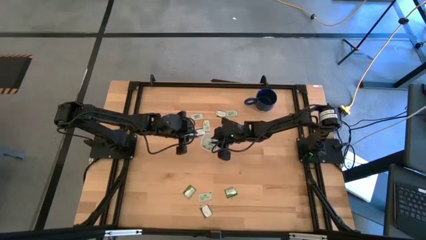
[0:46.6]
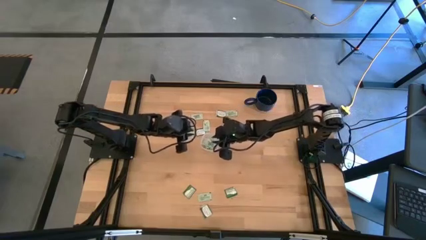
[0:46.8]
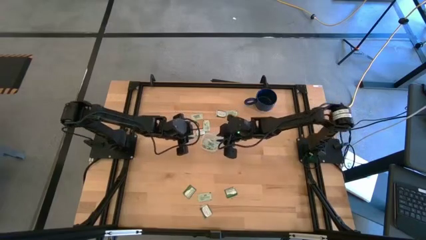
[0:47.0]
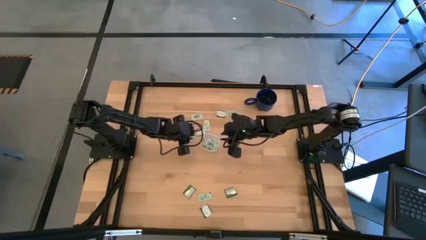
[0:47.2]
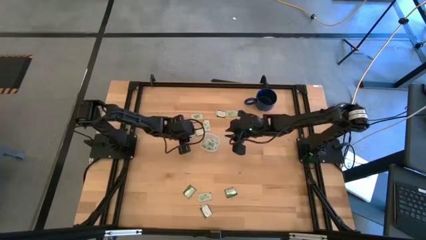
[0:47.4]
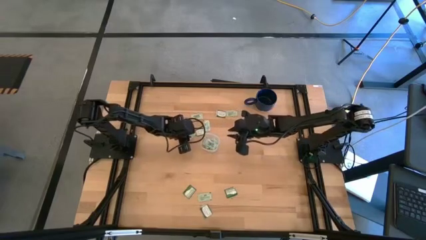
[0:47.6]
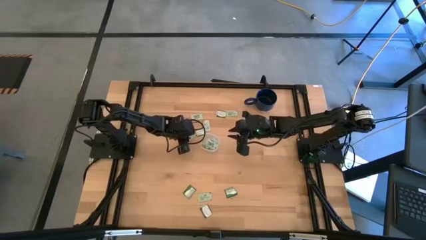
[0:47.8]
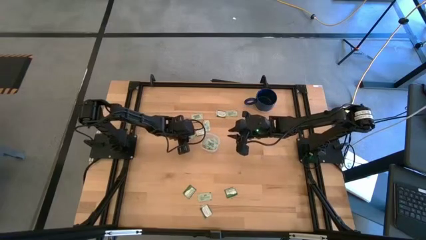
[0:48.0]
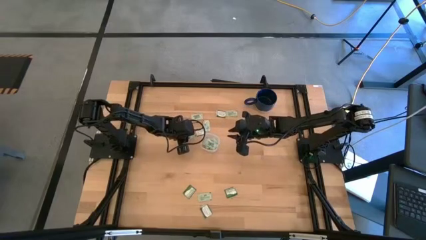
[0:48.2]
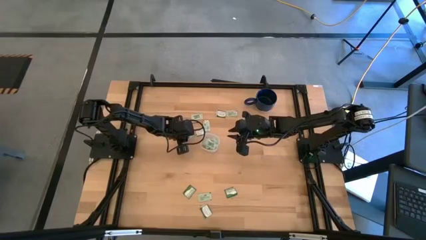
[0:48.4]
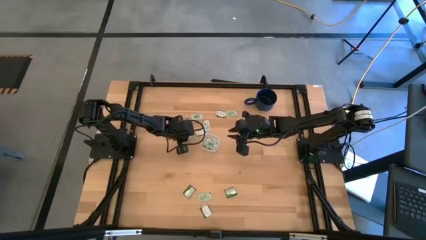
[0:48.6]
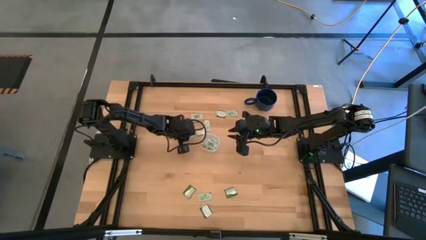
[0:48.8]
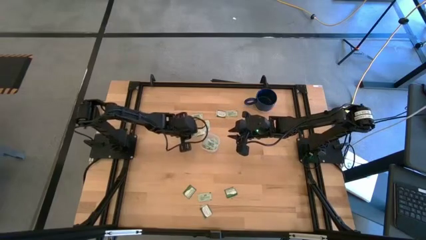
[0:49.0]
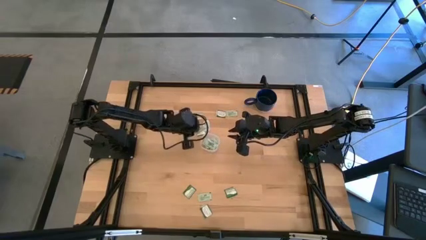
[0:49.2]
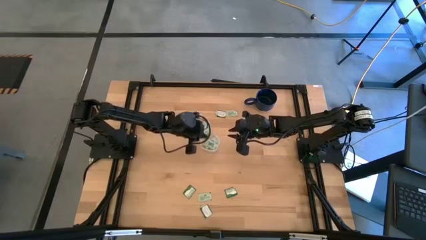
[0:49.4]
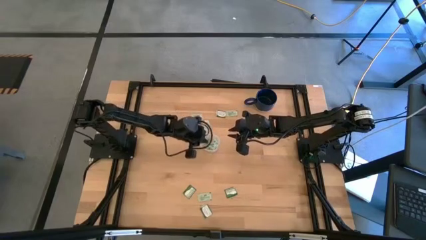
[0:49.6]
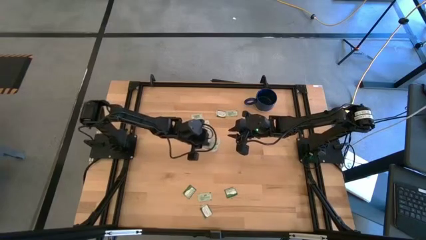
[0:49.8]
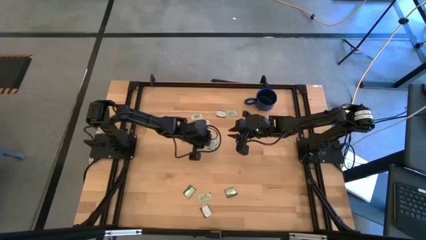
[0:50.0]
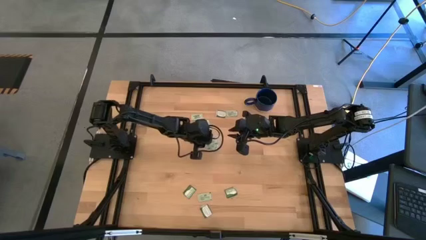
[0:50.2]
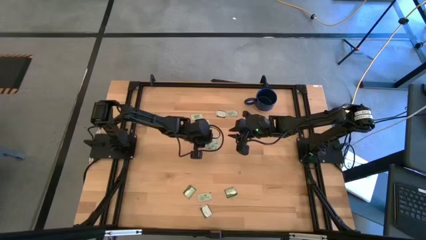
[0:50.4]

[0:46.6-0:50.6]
Task: Pick and place Stevia / Truvia into bins
Put the light green stevia packet into the container

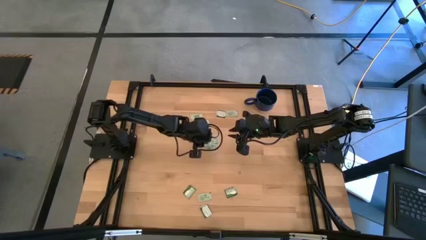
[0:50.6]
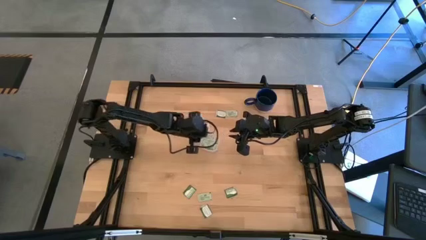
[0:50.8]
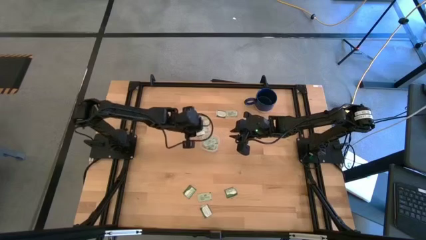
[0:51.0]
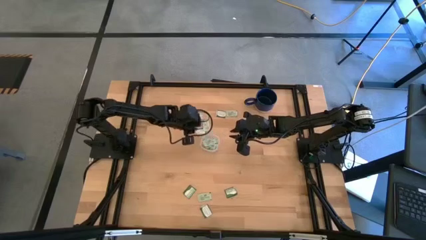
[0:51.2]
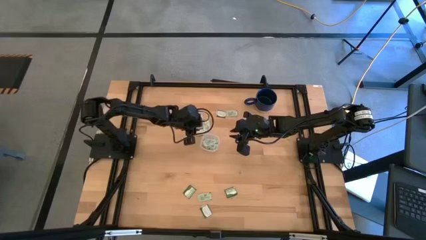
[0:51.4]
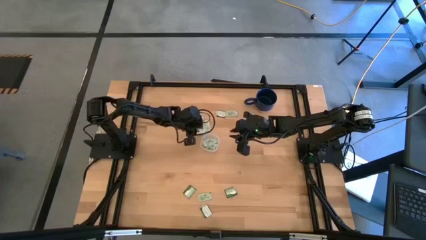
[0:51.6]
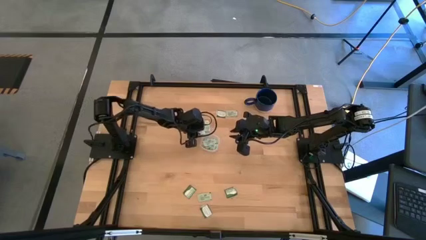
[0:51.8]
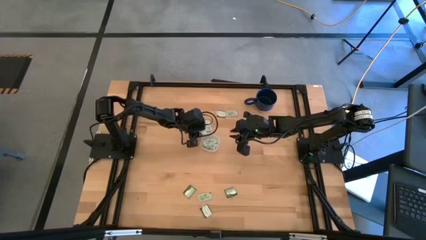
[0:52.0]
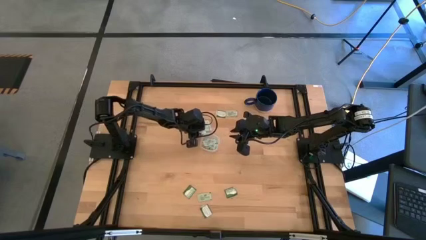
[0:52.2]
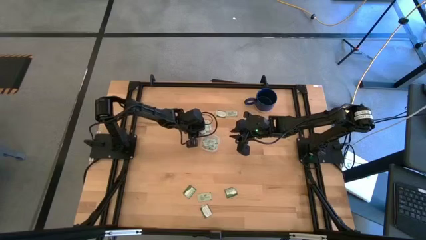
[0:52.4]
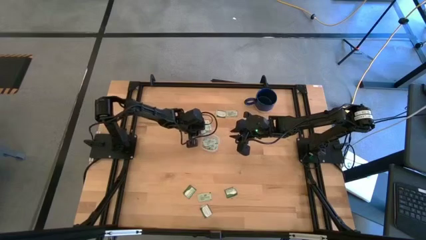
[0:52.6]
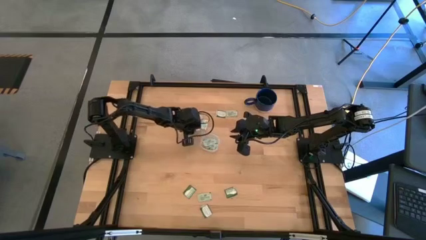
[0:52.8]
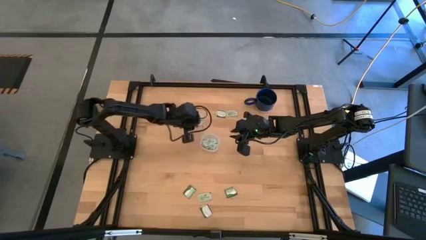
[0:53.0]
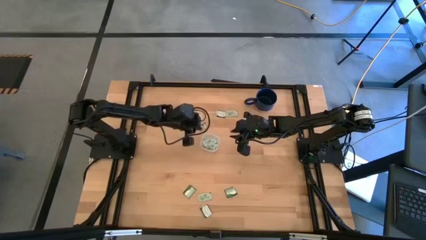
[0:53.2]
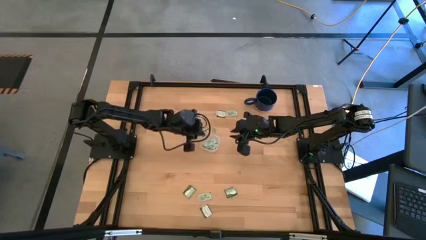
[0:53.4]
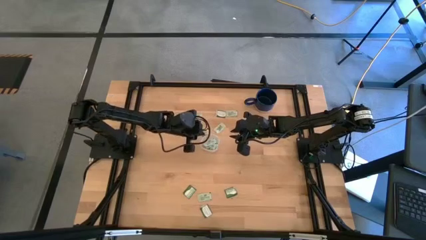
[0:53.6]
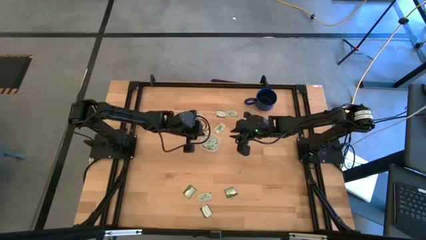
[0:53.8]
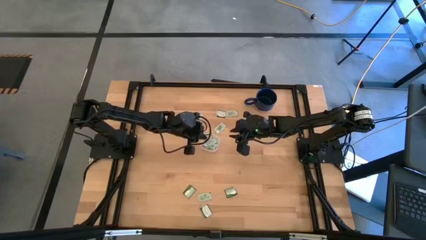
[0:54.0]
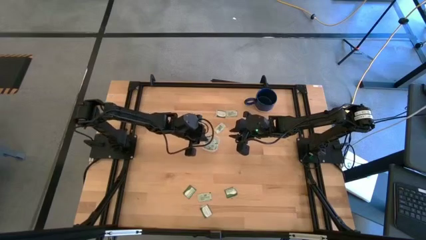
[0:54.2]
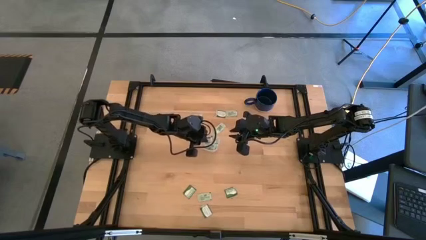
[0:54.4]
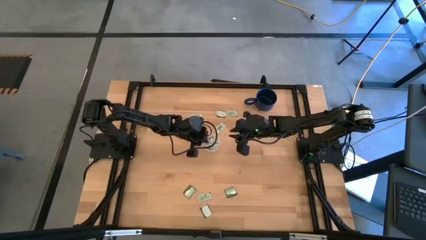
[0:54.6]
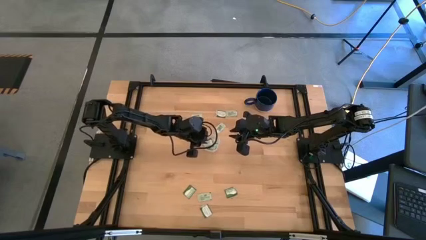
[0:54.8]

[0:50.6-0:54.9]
Put the green stevia packet into the container

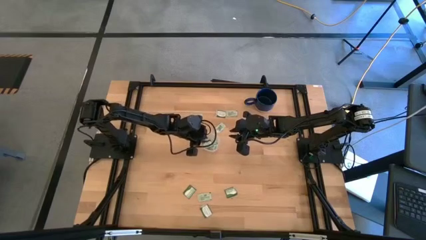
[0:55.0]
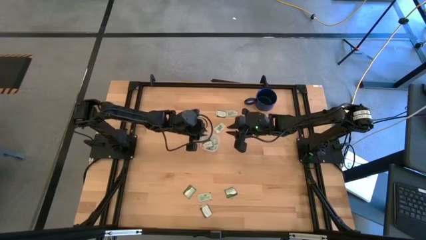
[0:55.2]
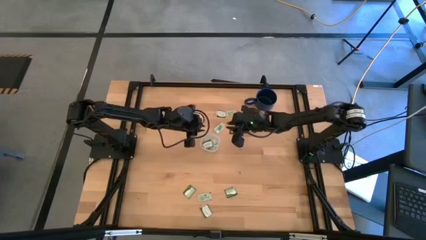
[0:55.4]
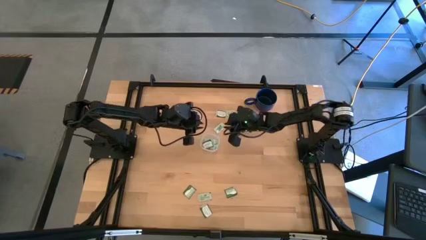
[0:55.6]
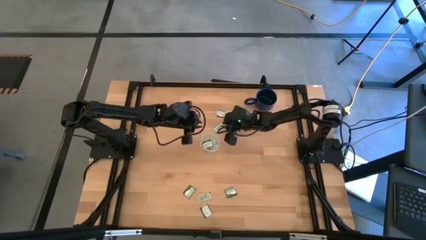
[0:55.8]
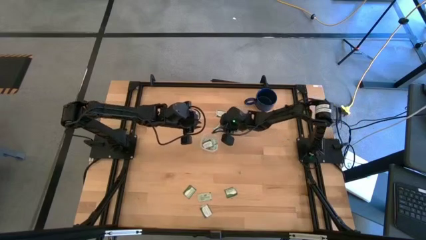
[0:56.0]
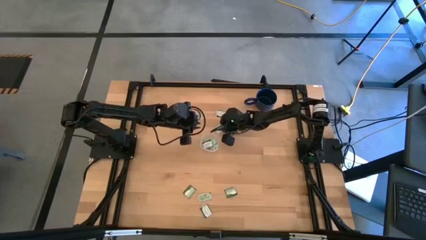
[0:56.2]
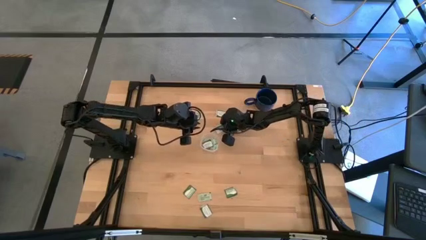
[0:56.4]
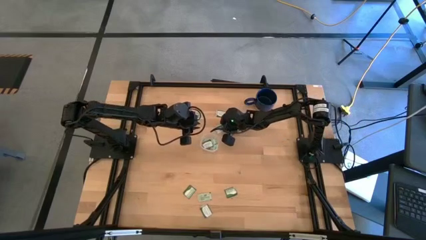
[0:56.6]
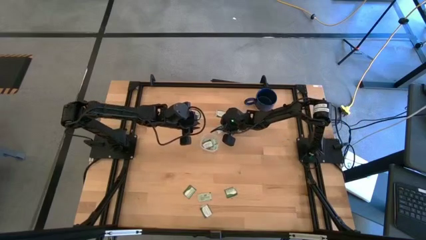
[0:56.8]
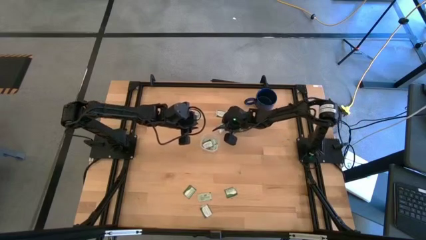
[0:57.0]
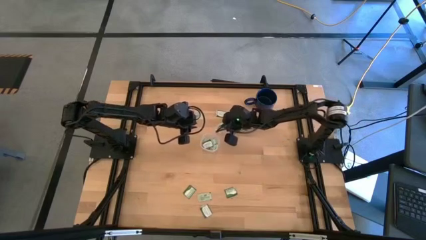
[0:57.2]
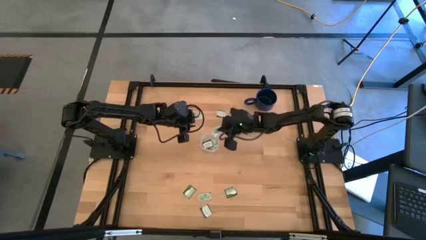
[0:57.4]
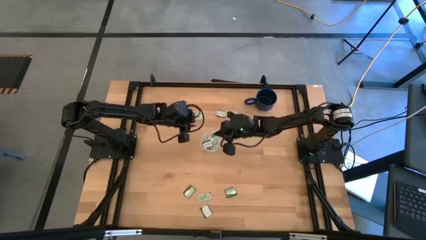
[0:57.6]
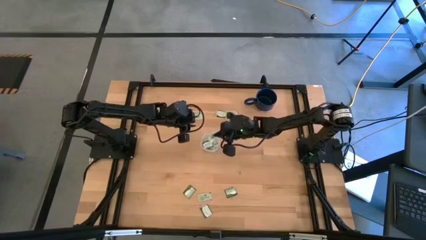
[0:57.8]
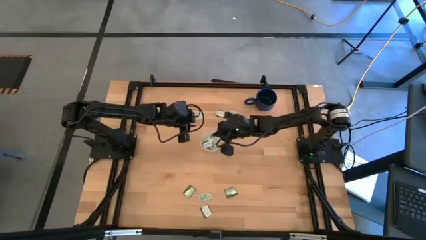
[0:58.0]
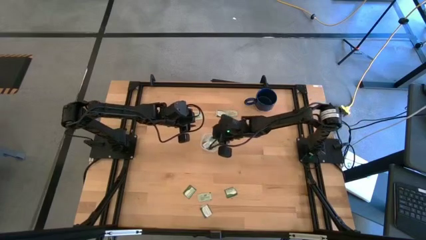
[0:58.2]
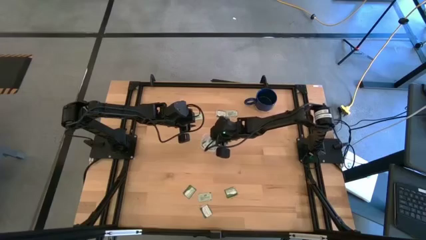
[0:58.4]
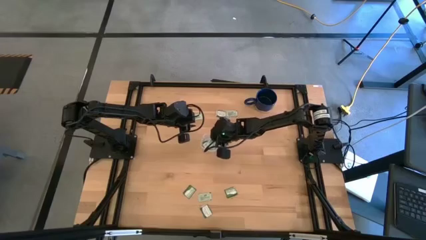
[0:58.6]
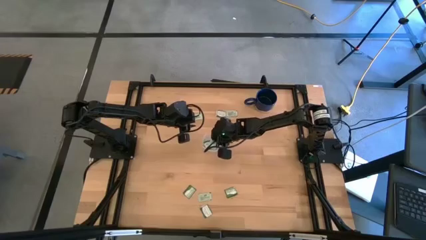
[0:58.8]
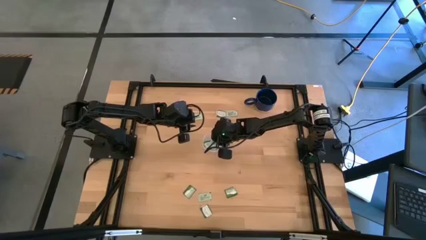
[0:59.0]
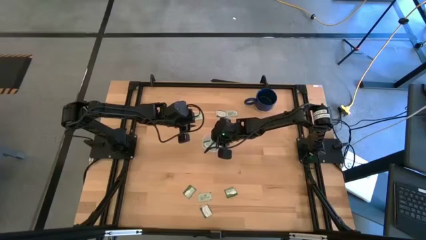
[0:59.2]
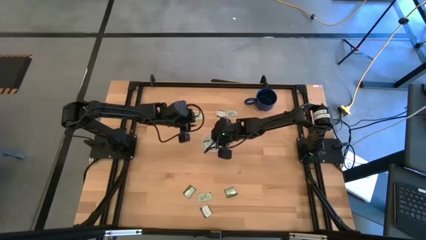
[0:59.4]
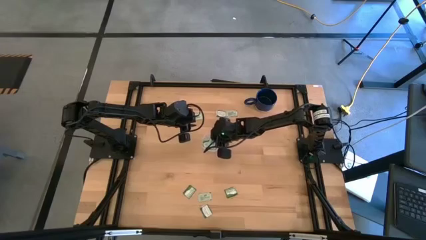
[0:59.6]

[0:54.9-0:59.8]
Put the light green stevia packet into the container

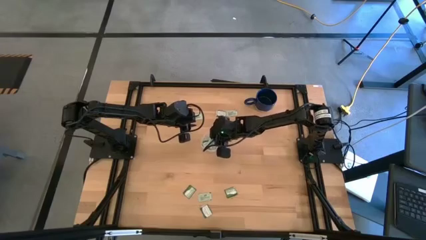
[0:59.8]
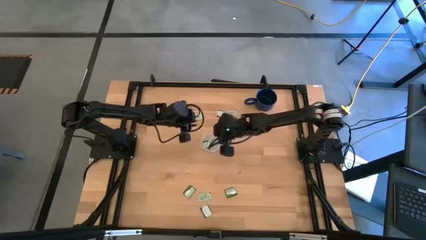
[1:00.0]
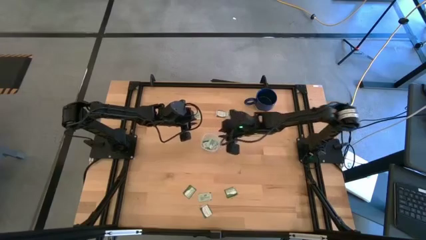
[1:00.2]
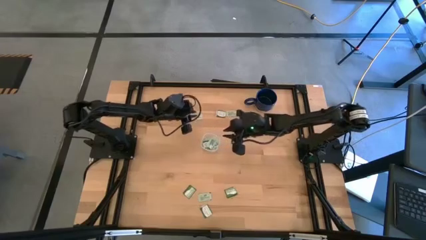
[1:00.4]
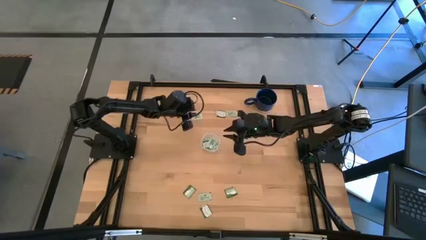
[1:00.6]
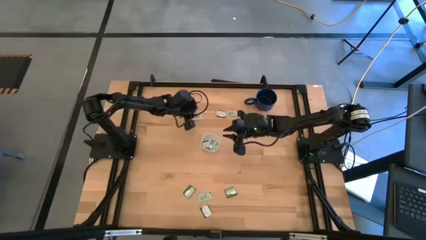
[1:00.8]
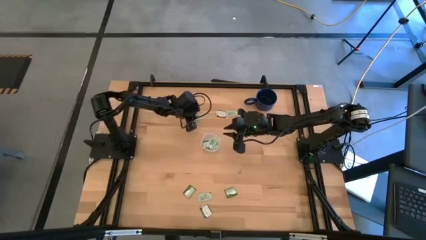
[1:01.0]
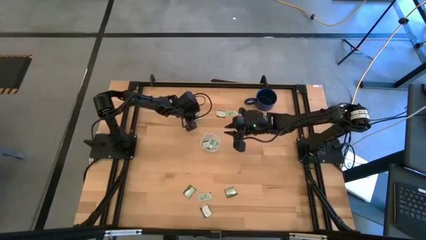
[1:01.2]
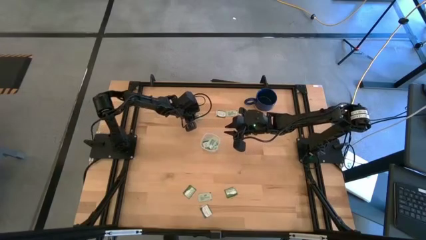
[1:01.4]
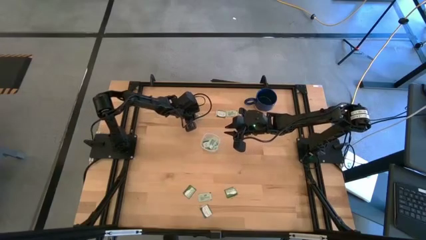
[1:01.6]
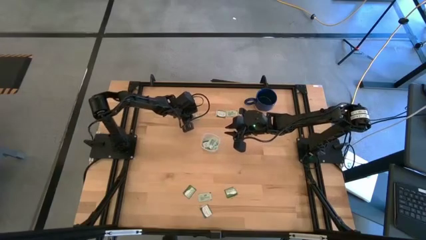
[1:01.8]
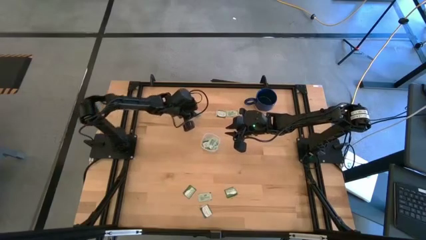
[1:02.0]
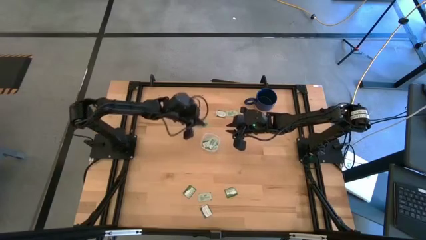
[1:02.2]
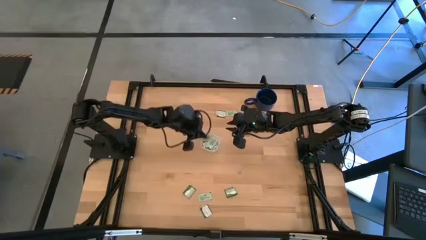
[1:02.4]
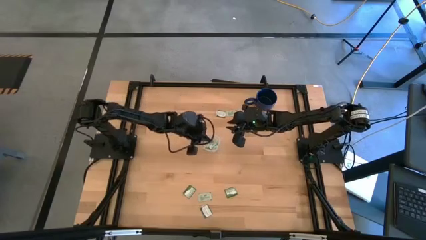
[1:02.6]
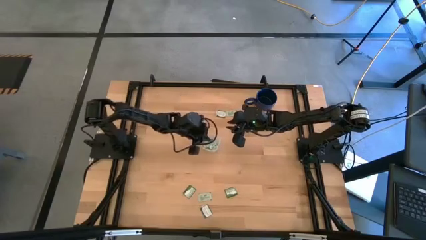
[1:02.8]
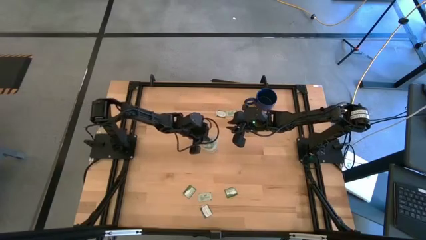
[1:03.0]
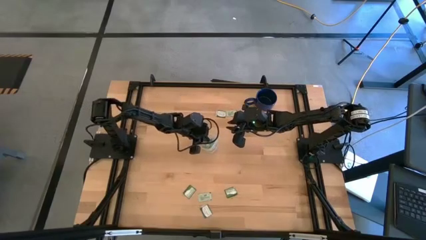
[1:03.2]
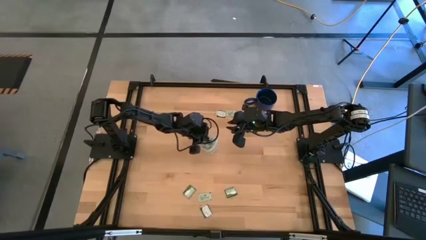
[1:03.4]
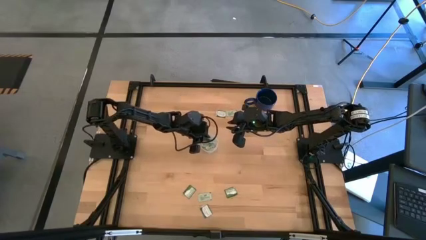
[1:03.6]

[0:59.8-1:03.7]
Put the top left light green stevia packet into the container
